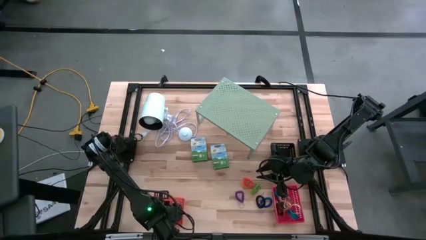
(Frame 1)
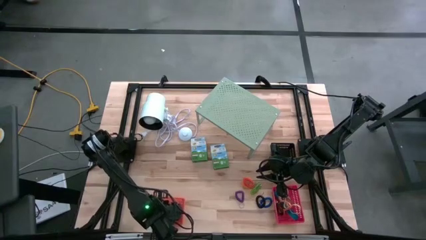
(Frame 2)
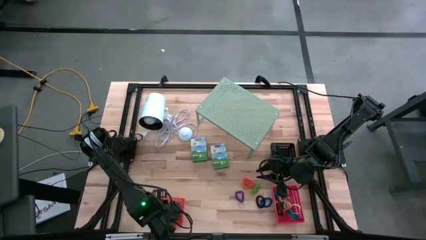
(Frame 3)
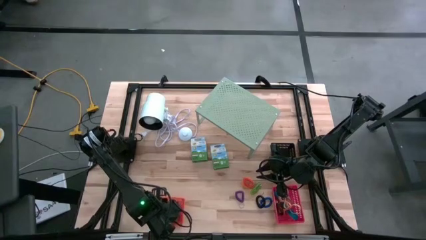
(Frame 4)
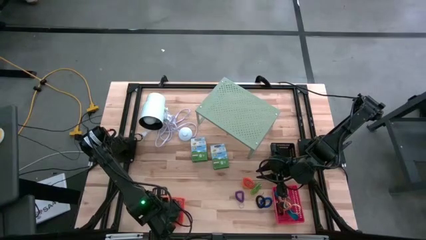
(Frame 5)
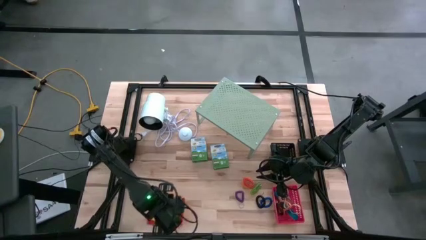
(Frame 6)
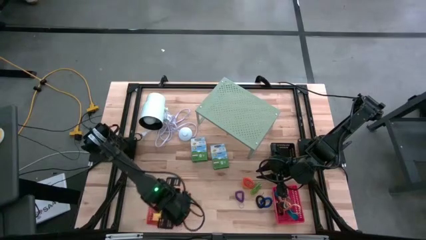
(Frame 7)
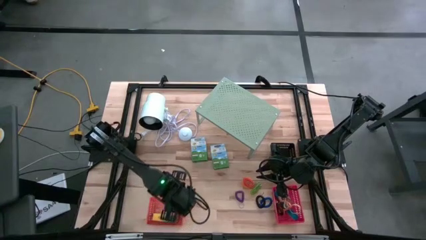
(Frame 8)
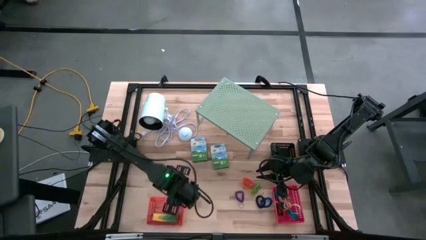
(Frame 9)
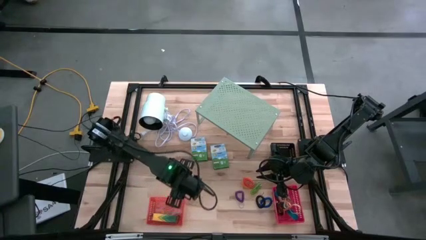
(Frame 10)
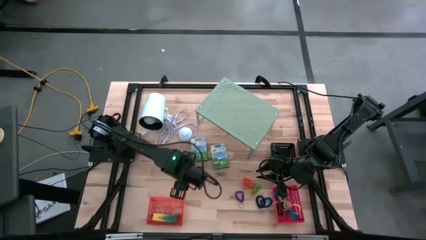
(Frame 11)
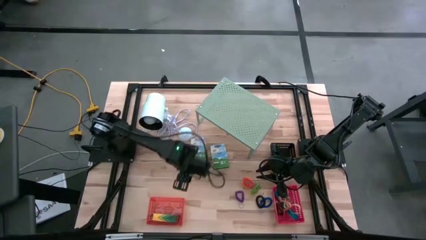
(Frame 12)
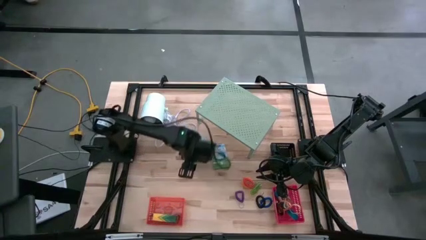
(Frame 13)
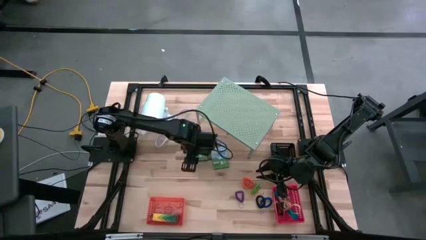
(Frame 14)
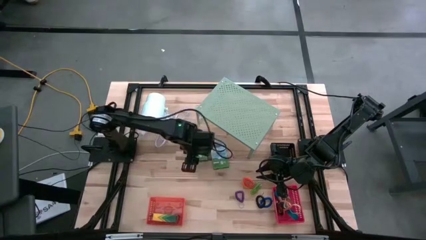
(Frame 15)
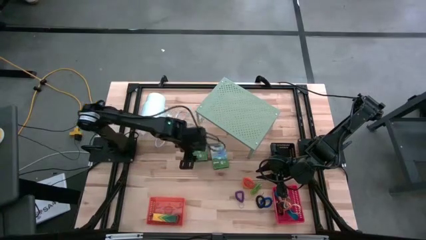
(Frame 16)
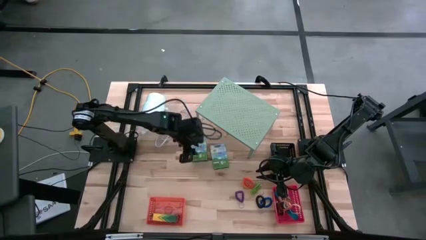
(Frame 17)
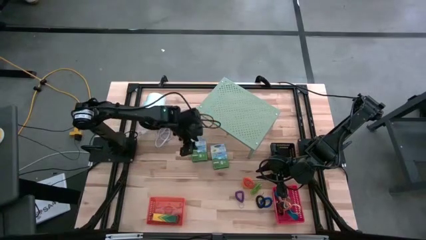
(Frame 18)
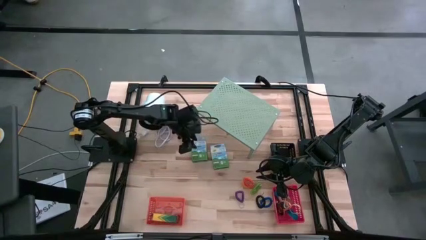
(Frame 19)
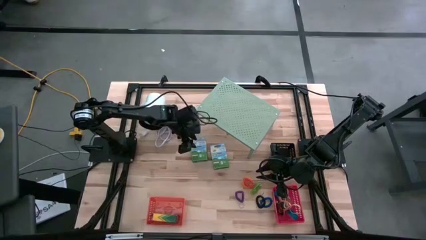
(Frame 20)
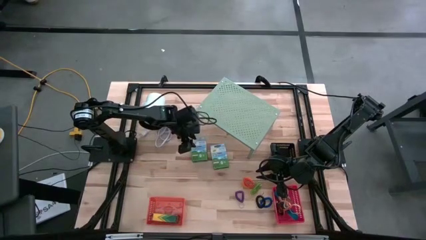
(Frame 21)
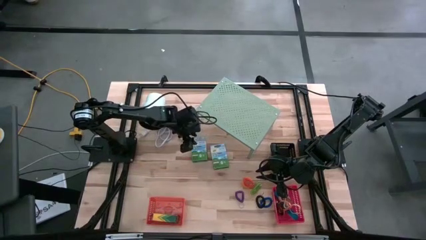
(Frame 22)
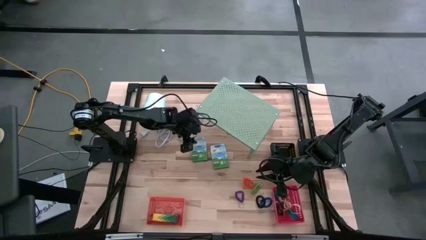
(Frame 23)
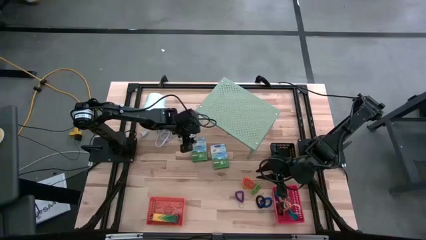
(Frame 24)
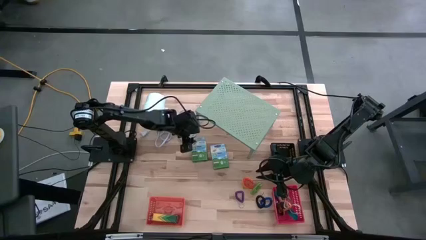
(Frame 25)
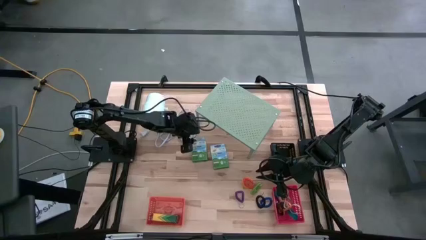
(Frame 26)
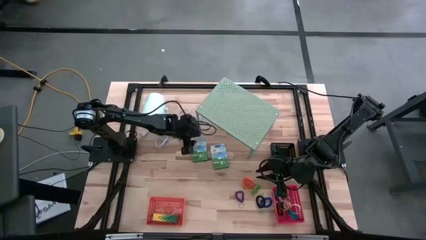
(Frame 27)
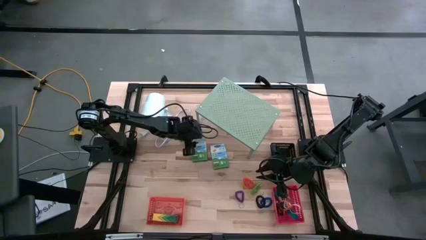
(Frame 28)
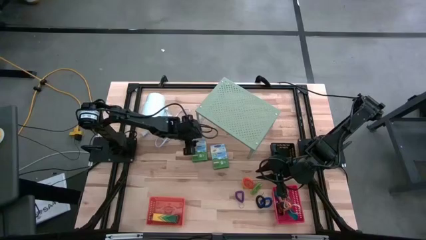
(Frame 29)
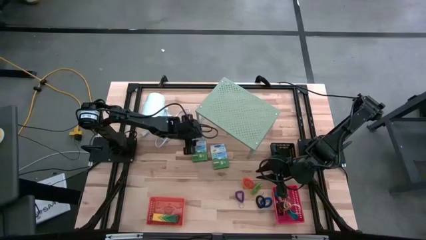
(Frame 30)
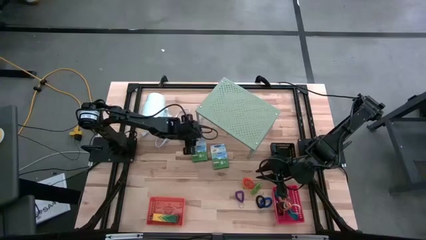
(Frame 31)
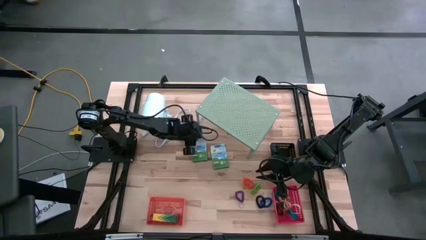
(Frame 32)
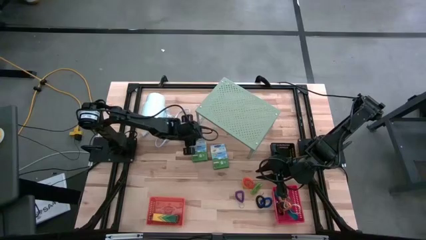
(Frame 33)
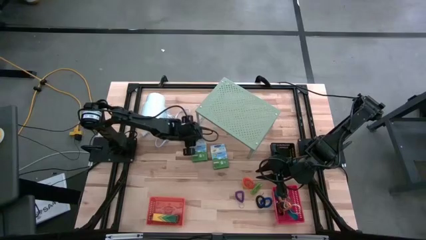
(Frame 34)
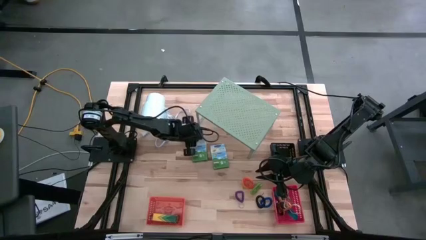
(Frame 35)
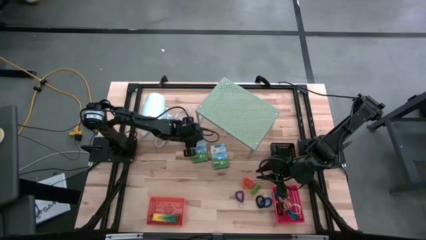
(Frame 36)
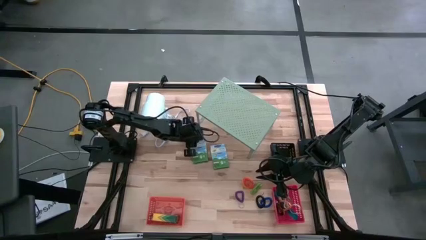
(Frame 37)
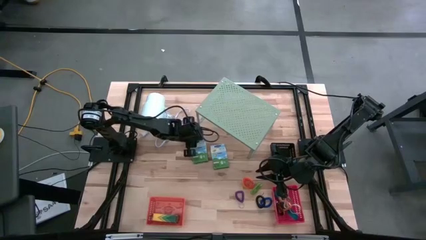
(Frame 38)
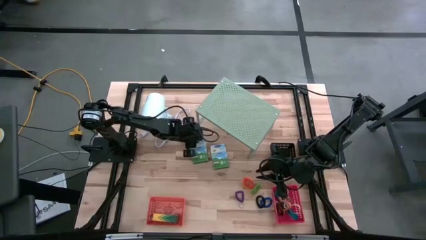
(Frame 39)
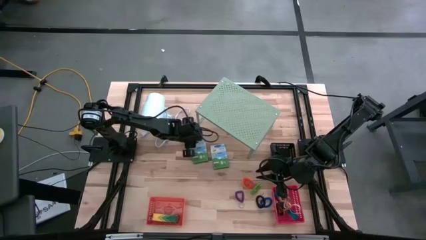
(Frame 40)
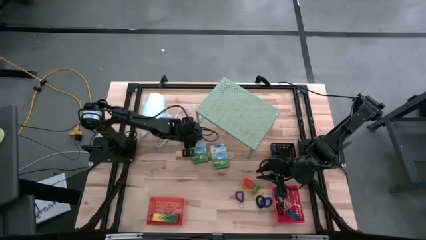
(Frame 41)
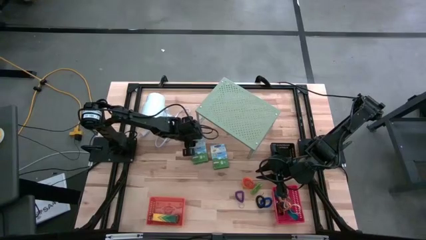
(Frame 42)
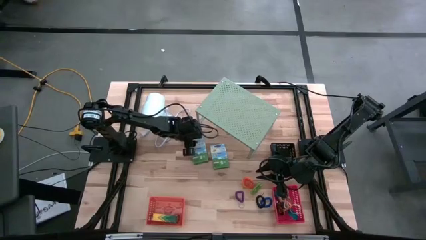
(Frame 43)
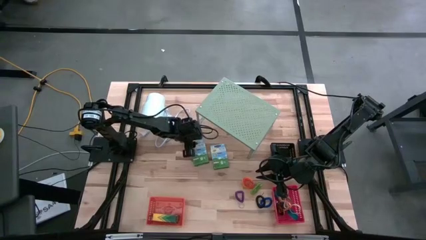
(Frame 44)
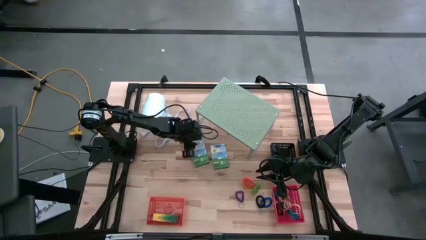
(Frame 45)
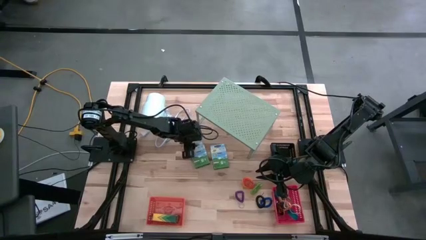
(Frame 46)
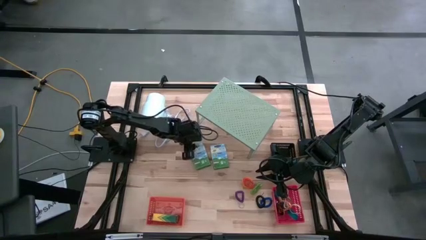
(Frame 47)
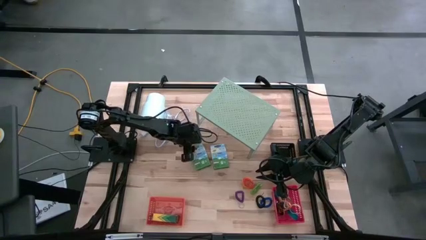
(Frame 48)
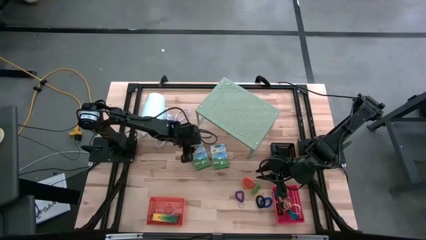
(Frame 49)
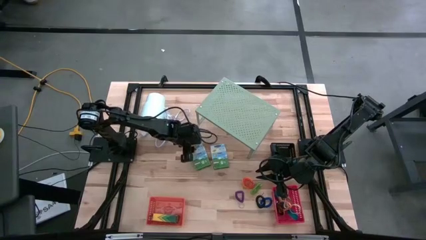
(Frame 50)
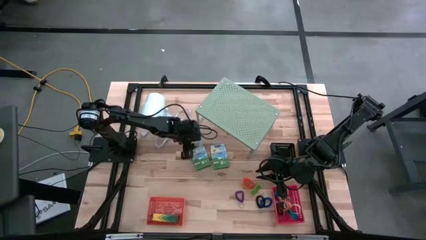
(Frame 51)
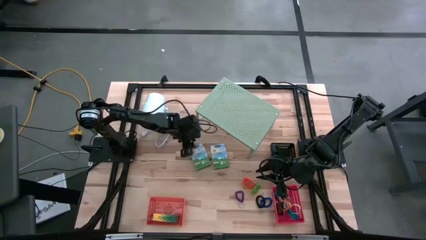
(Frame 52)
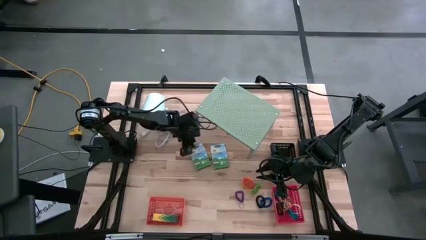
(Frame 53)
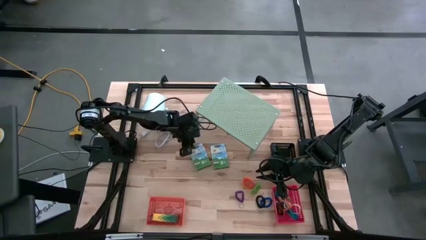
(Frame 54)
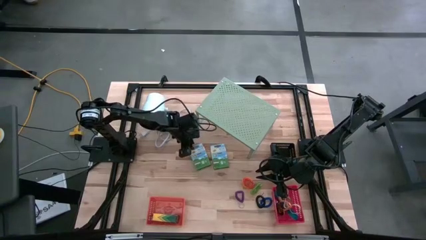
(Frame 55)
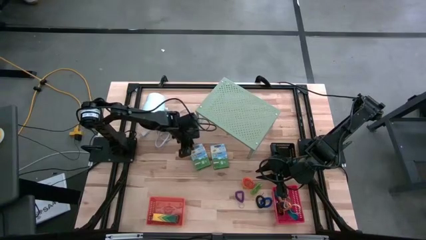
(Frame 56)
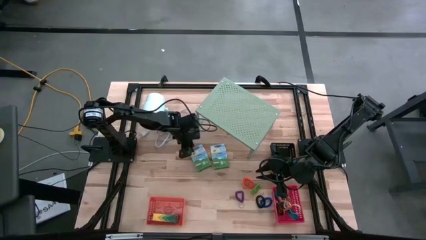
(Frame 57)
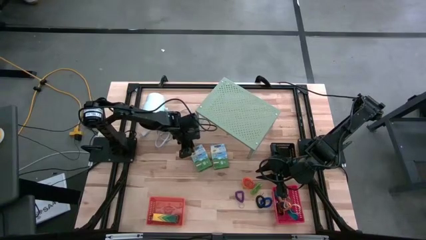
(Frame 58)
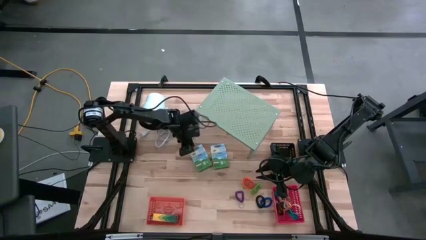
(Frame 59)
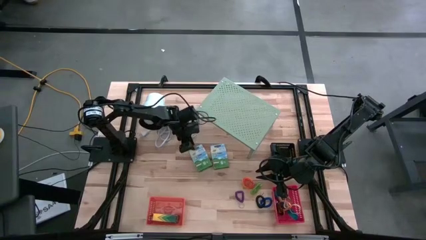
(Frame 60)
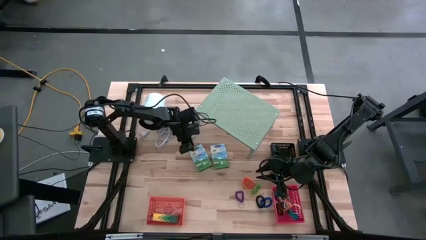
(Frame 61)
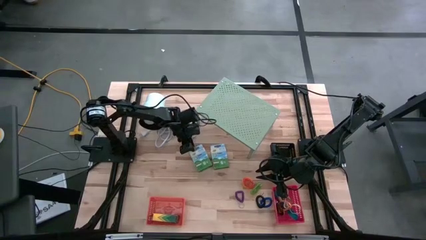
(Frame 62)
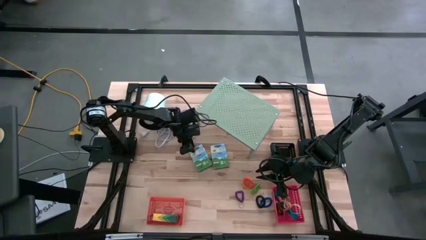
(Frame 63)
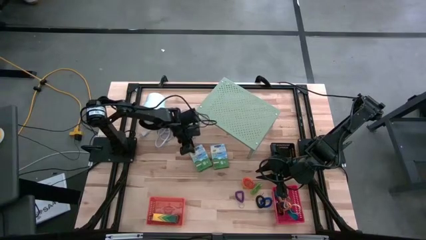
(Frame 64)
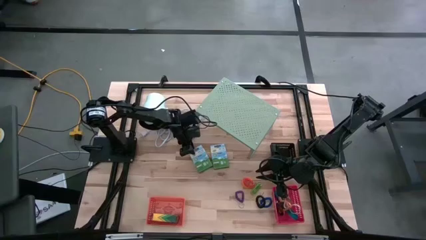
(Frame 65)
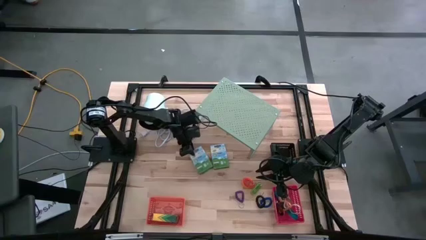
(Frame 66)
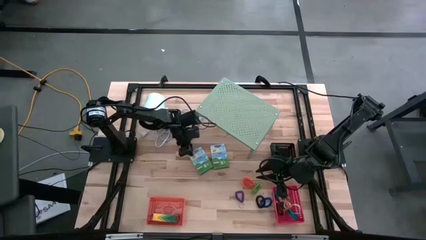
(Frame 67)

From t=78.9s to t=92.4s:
Task: Pick & Place Office Desk Supplies
Put the left crayon box into the orange bin
